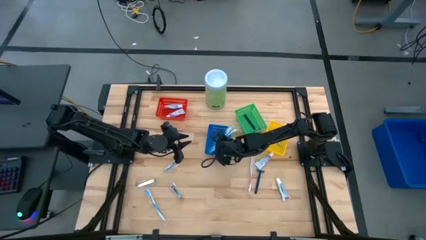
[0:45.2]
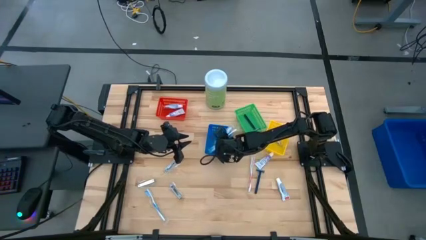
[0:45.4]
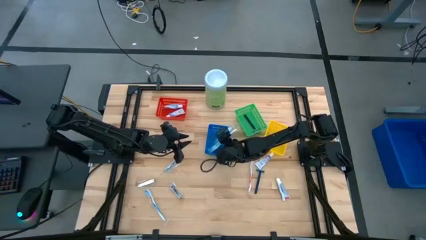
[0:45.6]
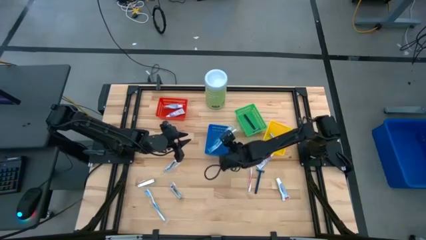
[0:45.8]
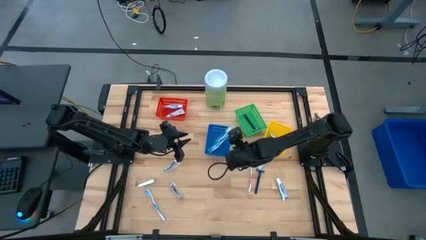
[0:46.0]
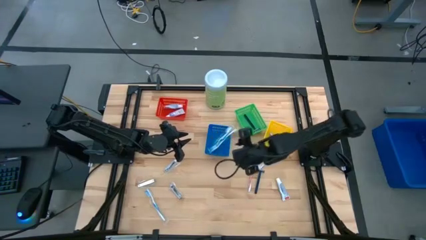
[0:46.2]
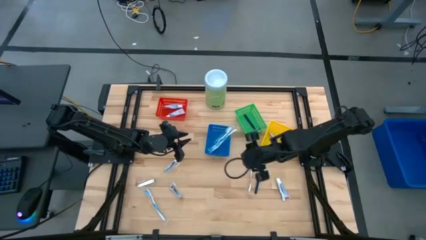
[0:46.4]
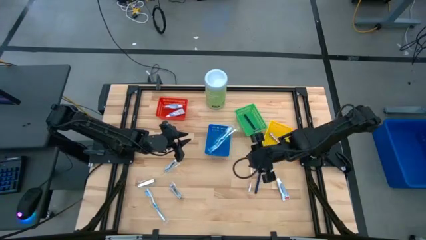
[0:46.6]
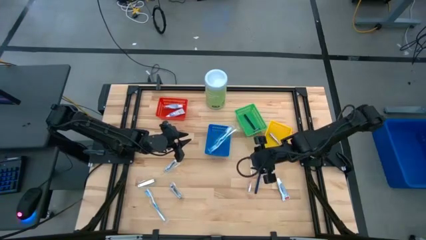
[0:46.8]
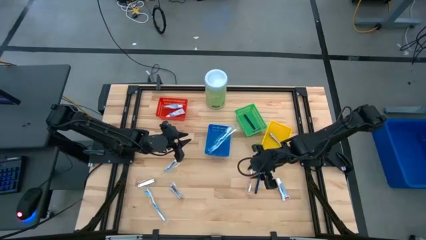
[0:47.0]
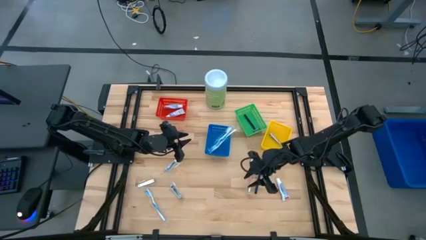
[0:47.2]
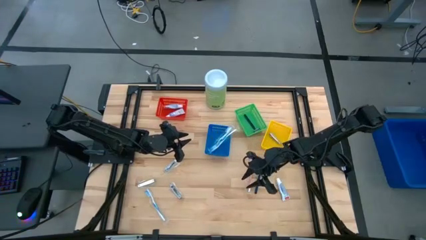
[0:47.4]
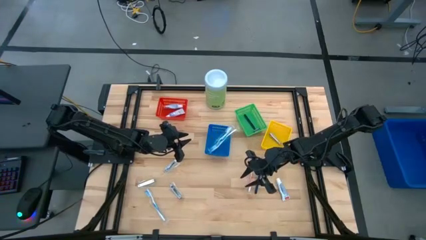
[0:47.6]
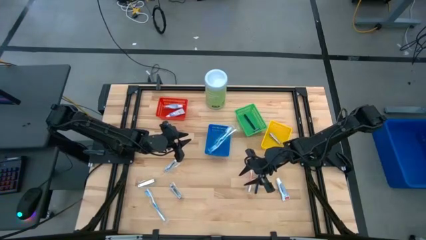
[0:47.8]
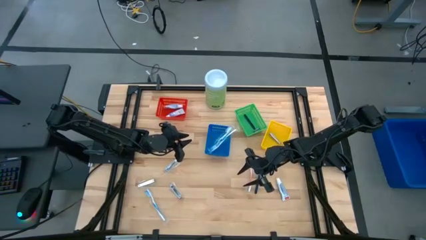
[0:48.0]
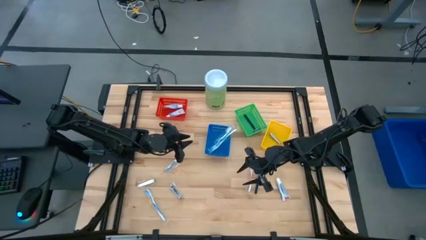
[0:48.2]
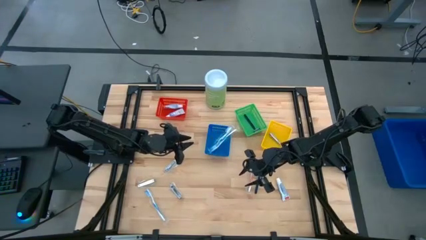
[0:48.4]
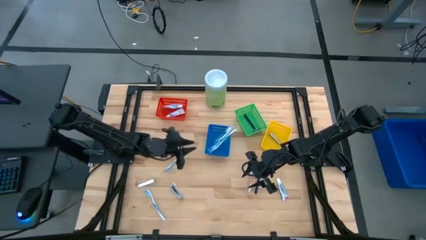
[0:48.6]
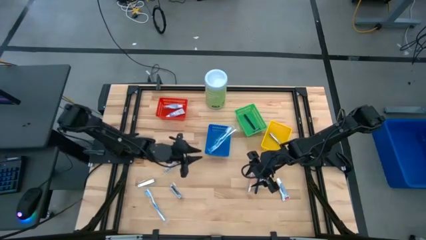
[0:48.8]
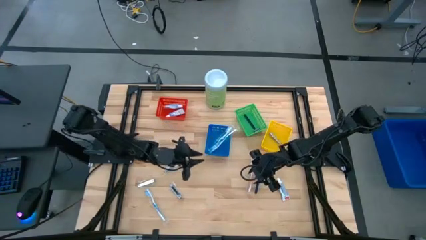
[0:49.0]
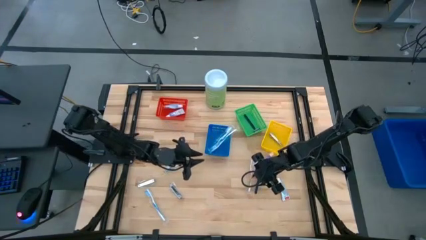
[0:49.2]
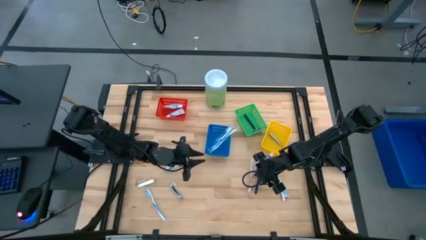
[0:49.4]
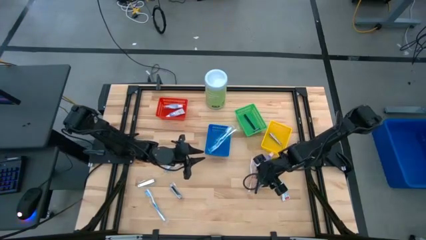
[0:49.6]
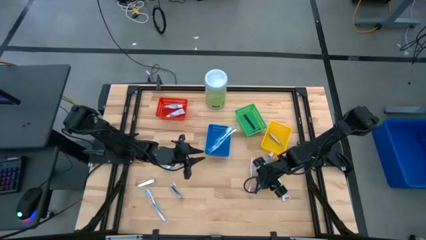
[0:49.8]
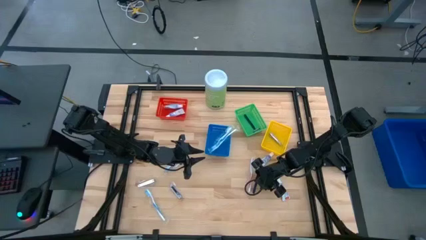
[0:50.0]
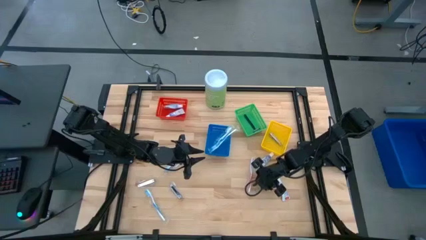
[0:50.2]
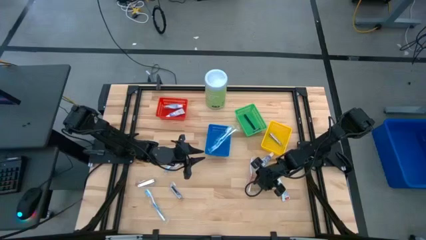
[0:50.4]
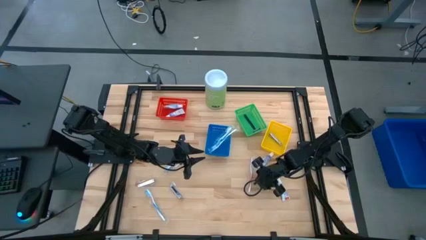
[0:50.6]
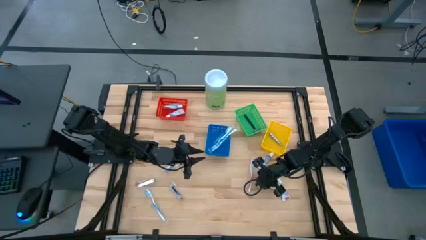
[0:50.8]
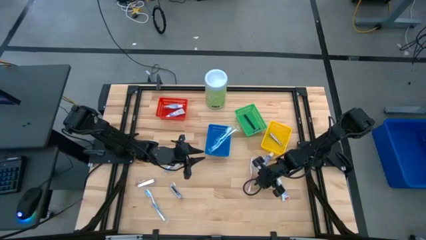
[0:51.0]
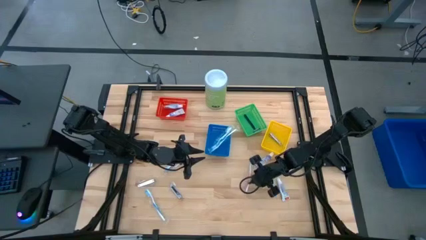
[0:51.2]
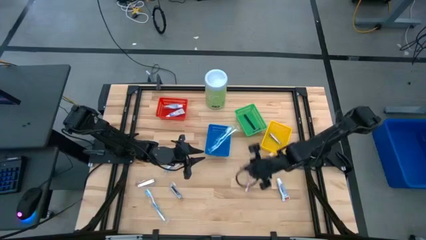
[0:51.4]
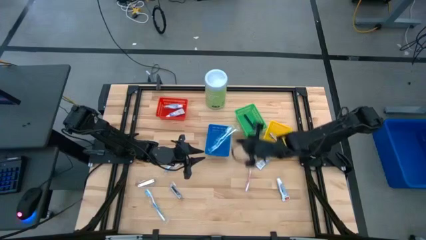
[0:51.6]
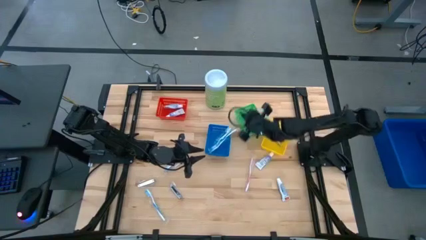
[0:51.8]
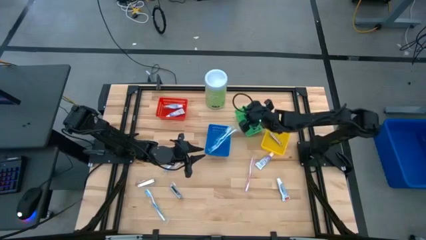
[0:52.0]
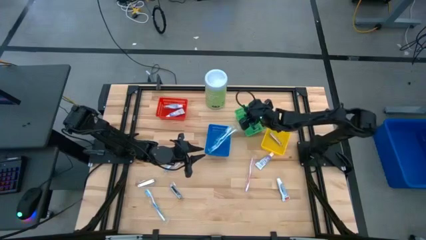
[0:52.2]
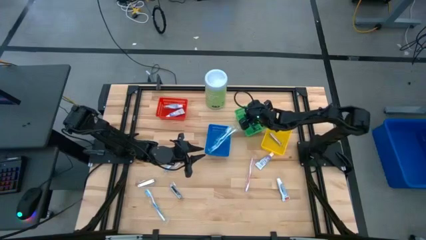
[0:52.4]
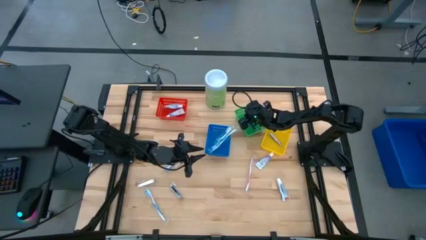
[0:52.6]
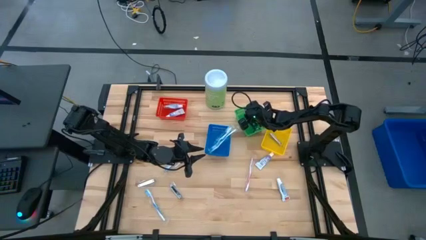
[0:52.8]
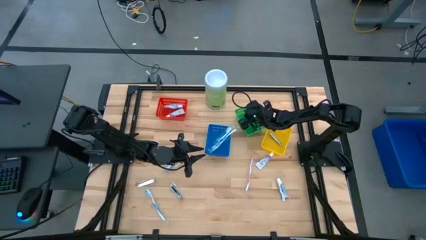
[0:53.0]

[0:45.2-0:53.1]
Task: Pick & Place Travel size toiletries
Put the blue razor into the green bin

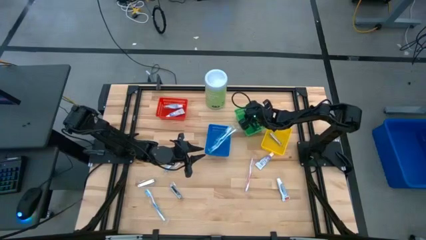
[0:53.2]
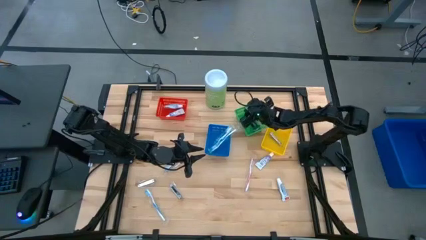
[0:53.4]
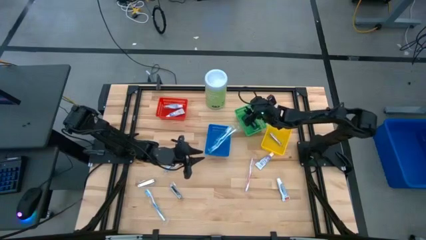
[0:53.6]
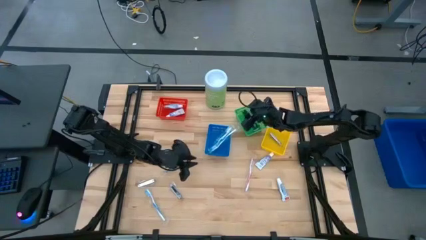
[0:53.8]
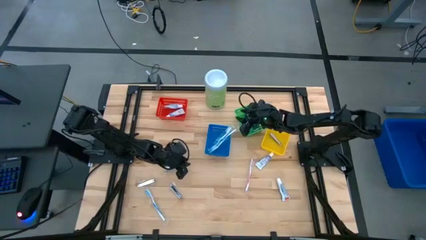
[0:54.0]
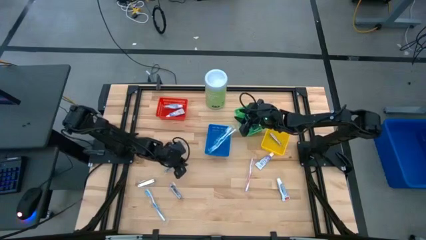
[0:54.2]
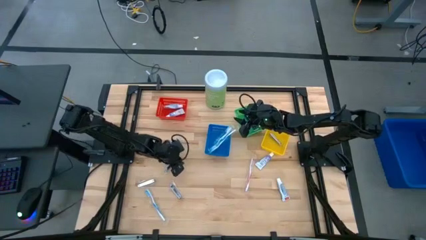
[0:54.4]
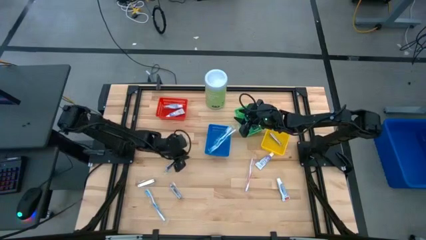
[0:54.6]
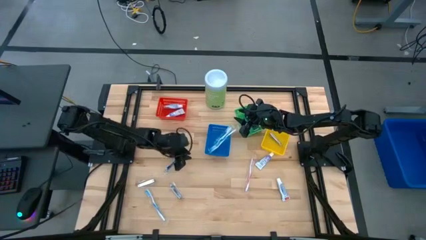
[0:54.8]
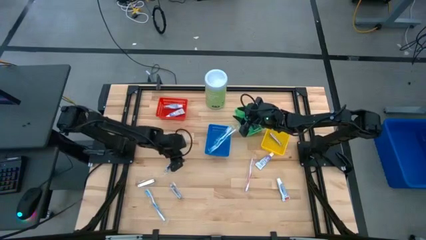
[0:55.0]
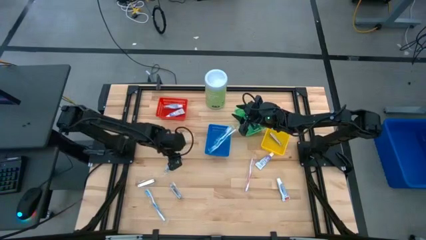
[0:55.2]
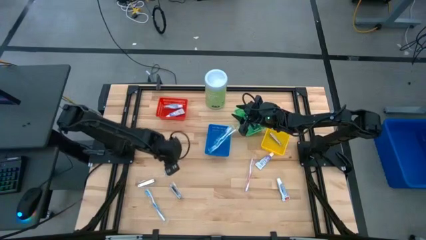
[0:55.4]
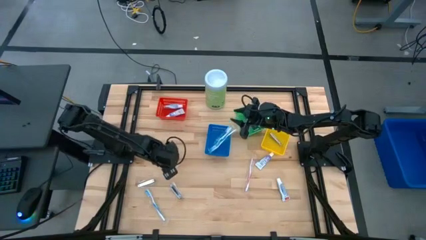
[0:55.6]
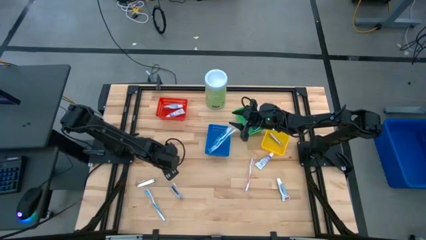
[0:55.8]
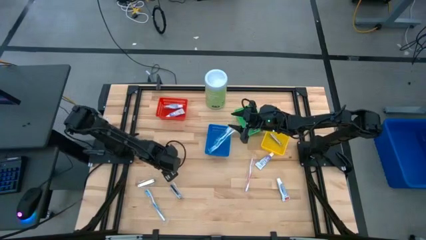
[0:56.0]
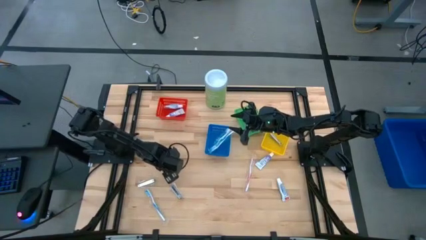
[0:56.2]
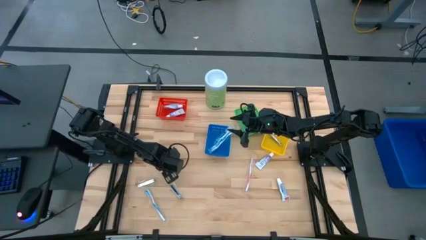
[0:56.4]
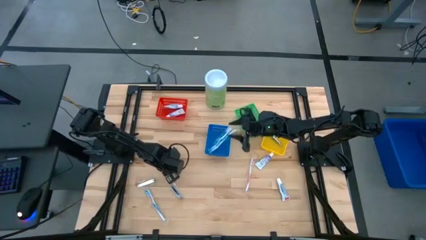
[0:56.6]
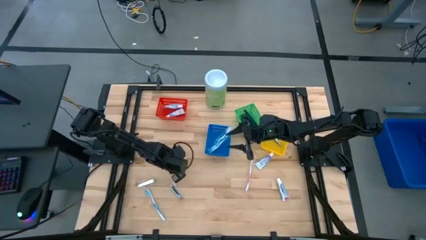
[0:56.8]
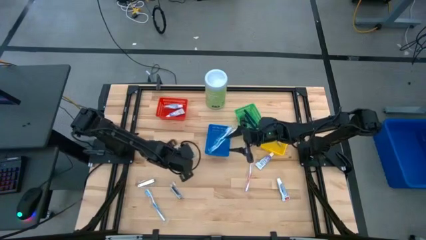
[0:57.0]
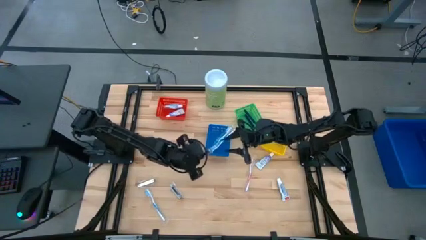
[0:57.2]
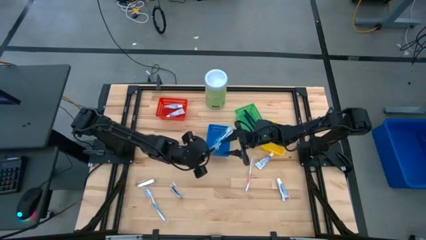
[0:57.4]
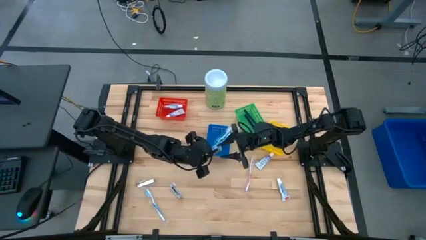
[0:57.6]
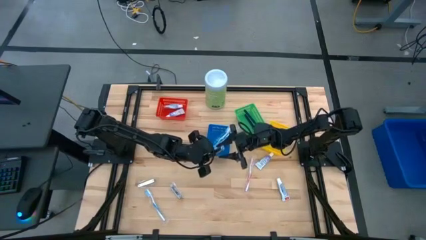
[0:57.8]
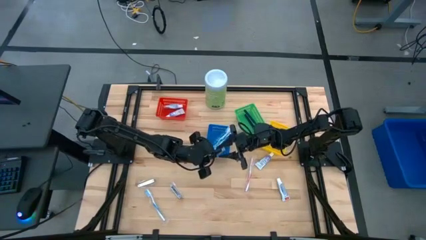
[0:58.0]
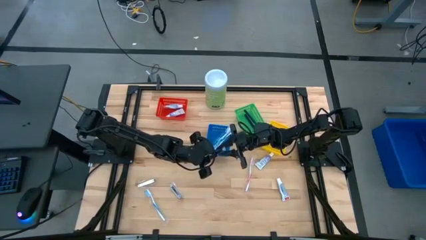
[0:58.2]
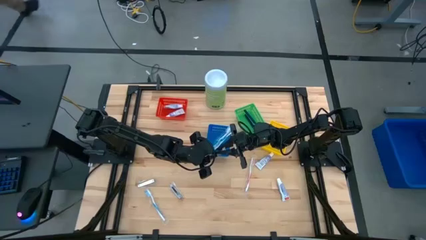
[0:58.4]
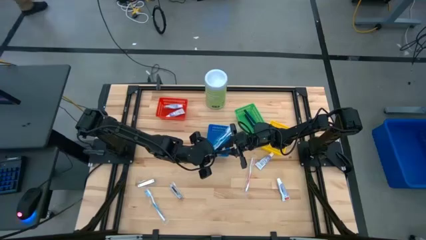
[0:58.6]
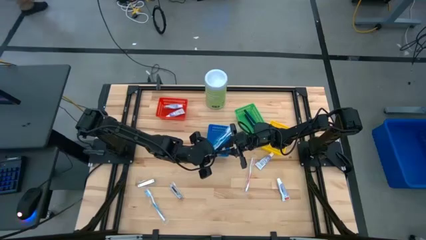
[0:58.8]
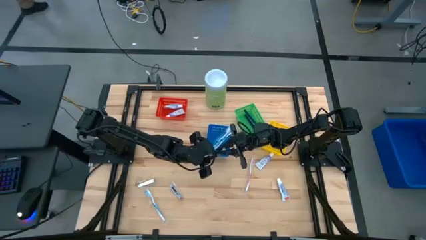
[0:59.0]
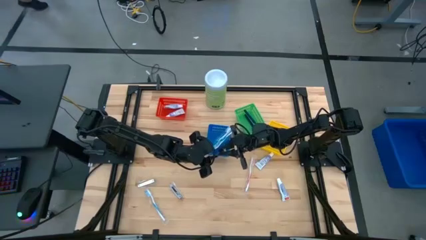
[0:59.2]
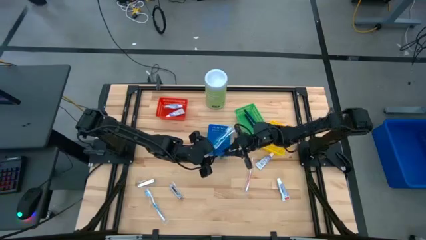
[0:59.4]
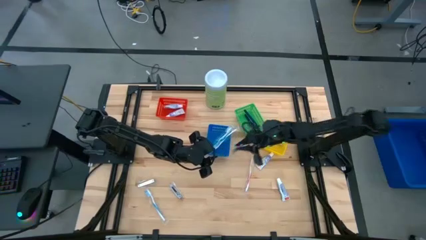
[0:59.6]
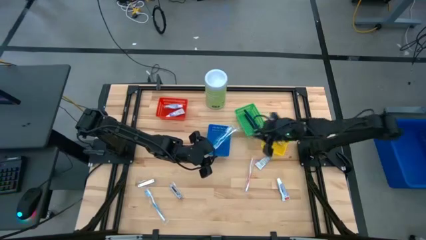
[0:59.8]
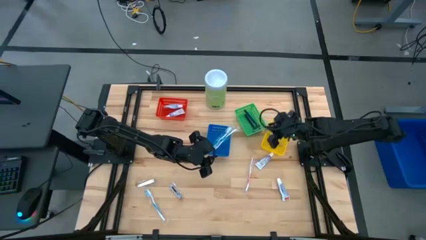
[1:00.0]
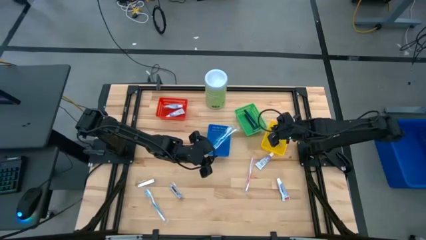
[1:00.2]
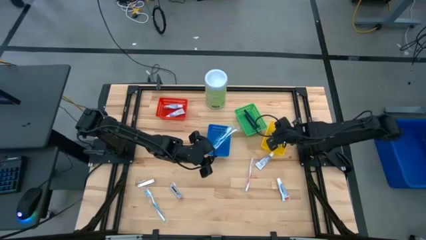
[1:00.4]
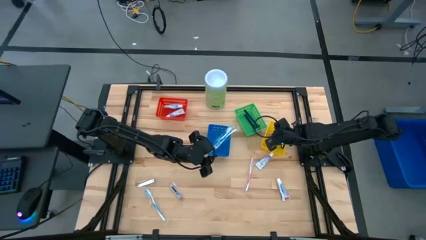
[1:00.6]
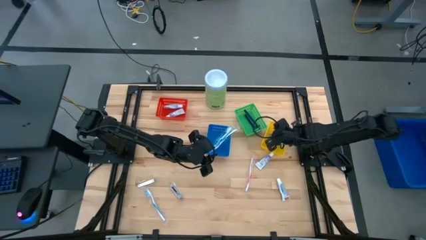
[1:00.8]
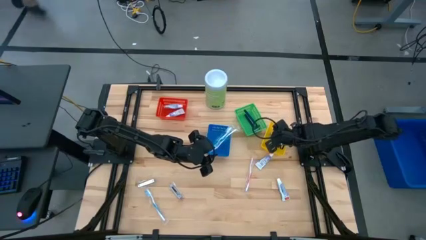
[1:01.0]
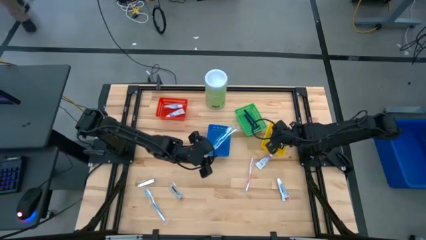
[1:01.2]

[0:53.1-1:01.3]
Put the silver nail cutter into the yellow bin
